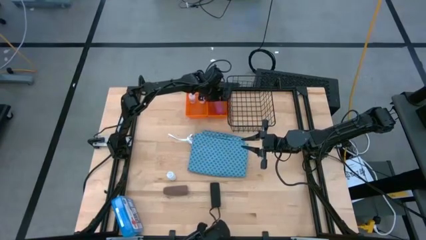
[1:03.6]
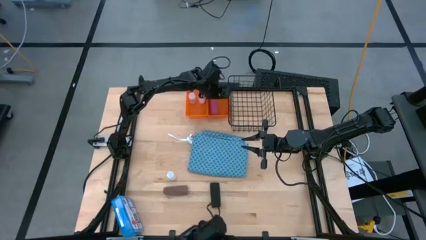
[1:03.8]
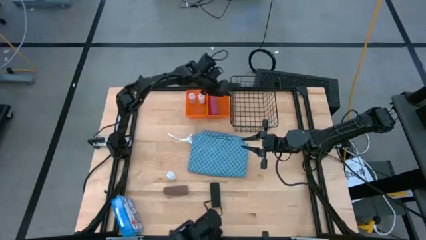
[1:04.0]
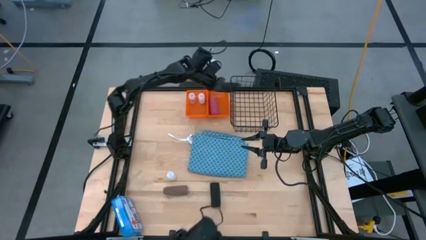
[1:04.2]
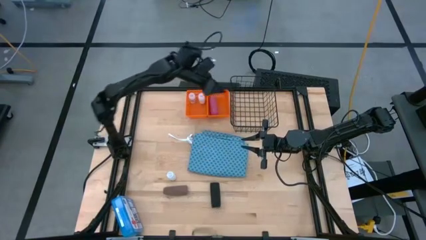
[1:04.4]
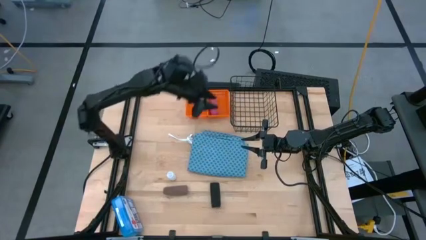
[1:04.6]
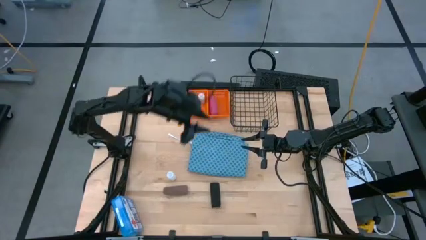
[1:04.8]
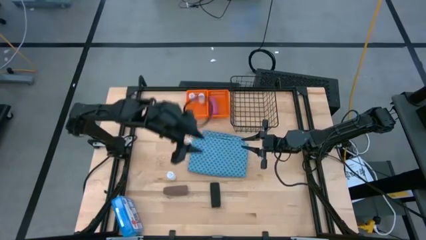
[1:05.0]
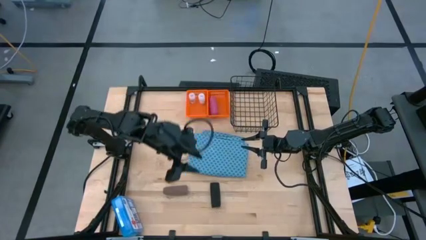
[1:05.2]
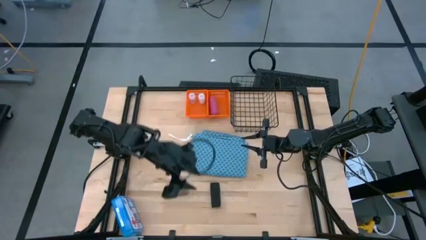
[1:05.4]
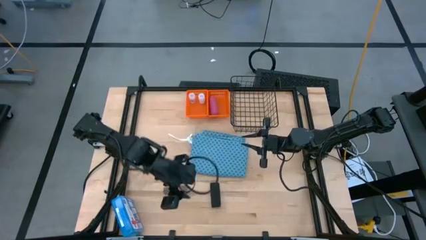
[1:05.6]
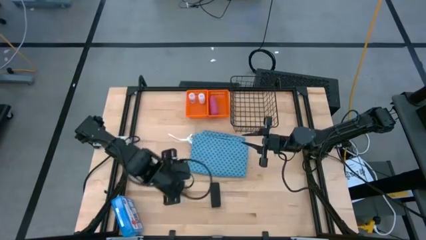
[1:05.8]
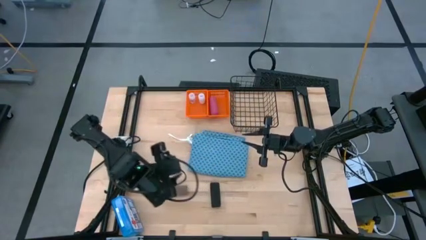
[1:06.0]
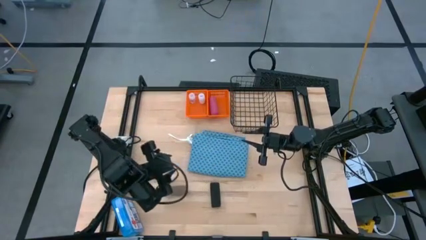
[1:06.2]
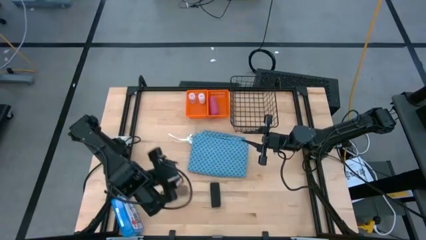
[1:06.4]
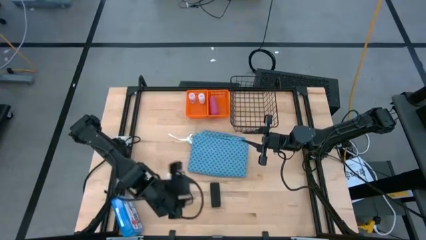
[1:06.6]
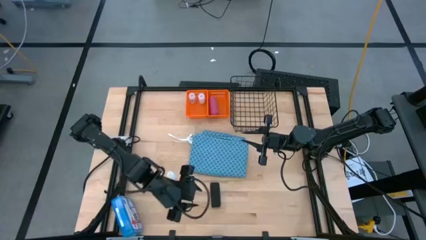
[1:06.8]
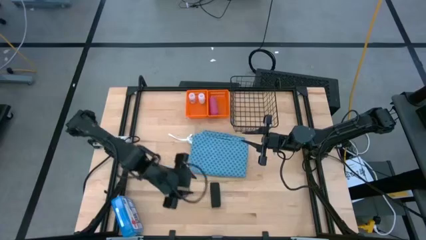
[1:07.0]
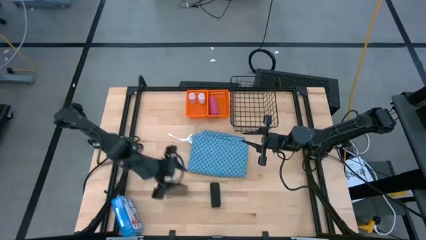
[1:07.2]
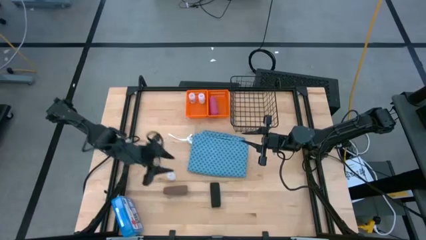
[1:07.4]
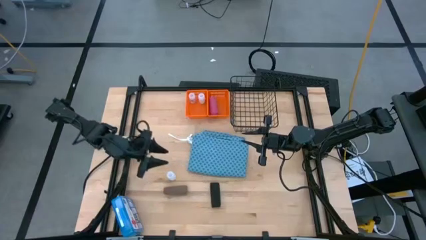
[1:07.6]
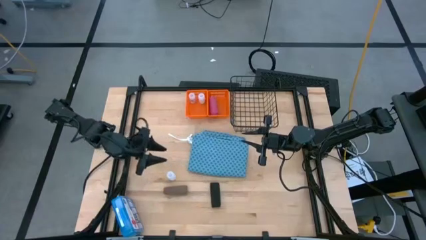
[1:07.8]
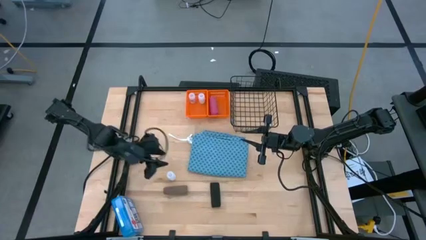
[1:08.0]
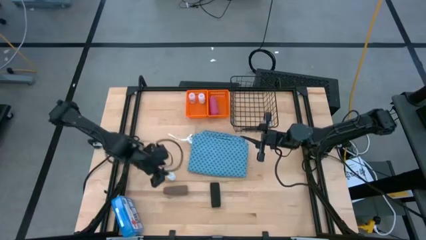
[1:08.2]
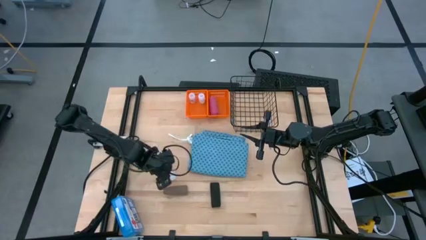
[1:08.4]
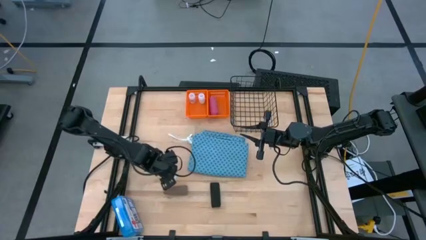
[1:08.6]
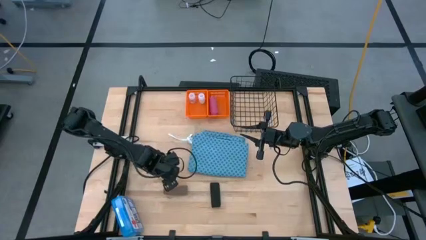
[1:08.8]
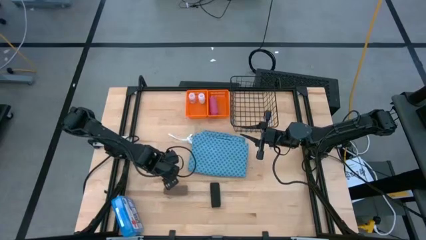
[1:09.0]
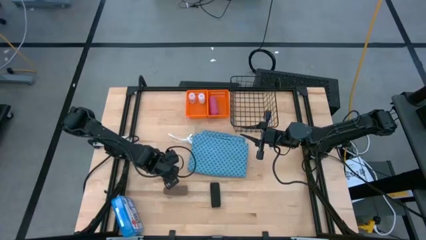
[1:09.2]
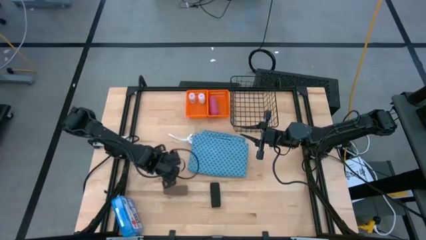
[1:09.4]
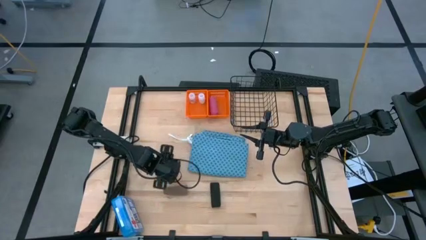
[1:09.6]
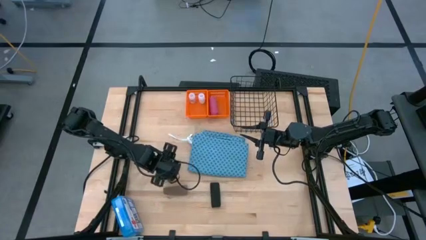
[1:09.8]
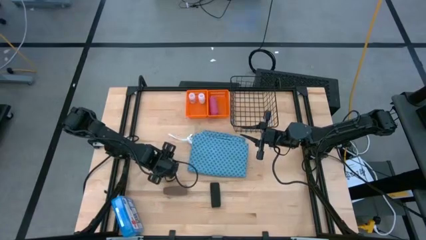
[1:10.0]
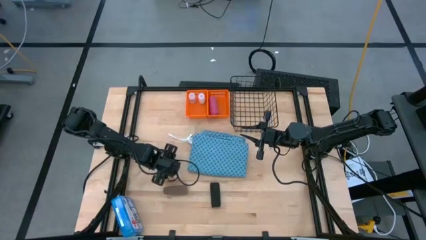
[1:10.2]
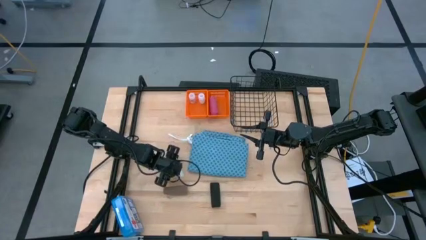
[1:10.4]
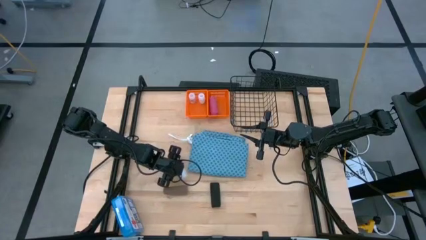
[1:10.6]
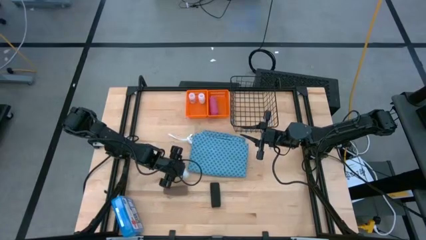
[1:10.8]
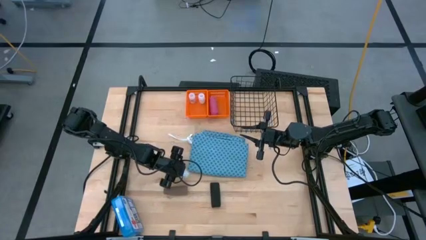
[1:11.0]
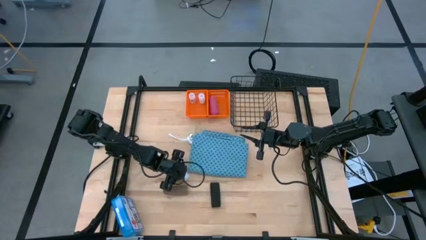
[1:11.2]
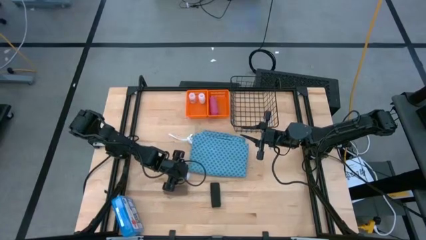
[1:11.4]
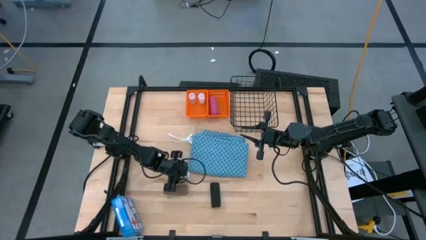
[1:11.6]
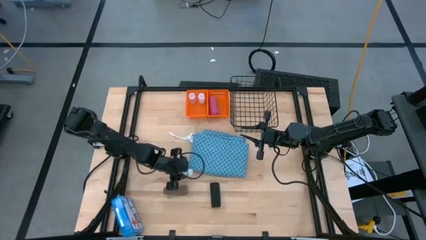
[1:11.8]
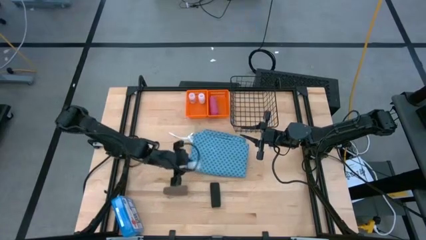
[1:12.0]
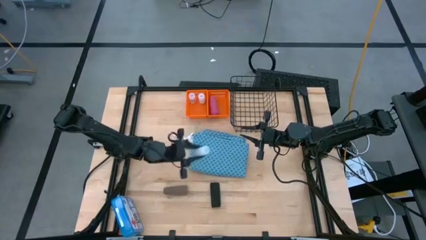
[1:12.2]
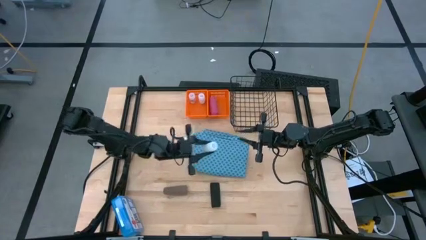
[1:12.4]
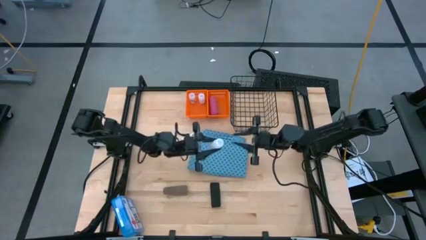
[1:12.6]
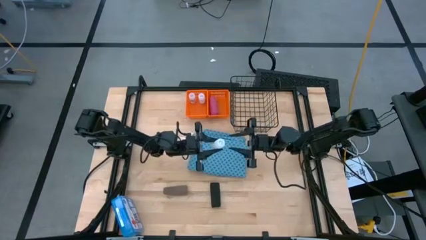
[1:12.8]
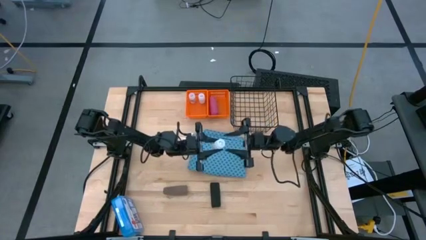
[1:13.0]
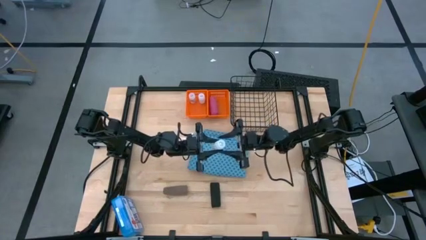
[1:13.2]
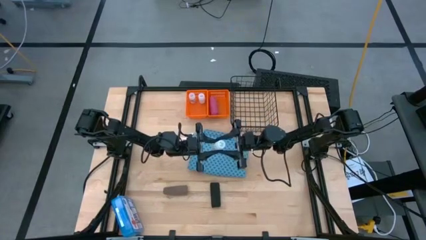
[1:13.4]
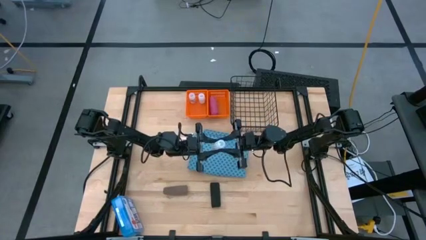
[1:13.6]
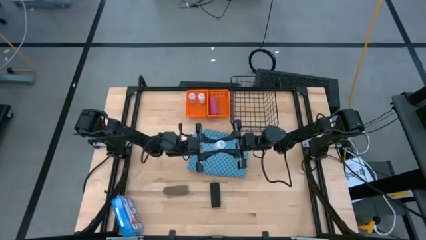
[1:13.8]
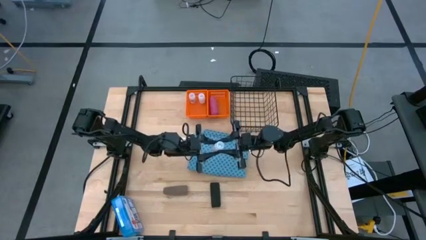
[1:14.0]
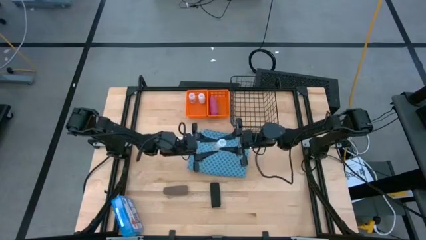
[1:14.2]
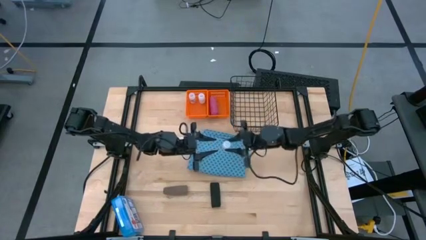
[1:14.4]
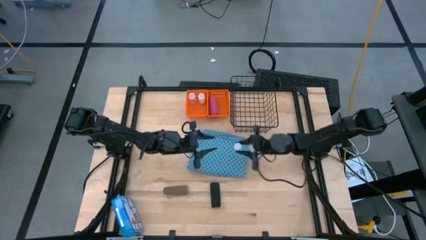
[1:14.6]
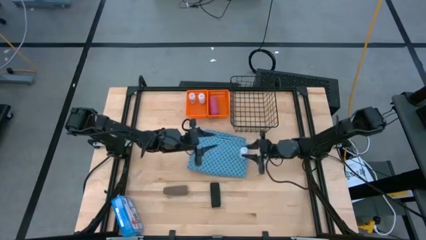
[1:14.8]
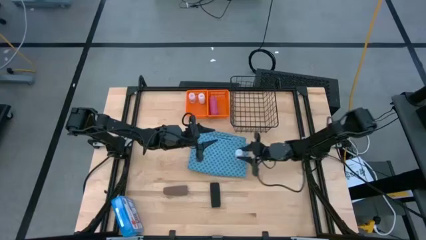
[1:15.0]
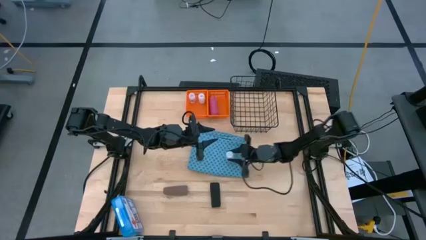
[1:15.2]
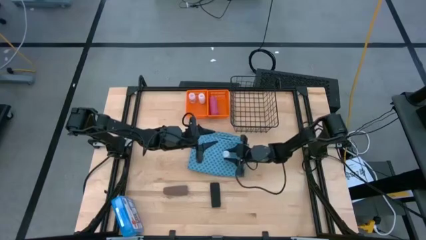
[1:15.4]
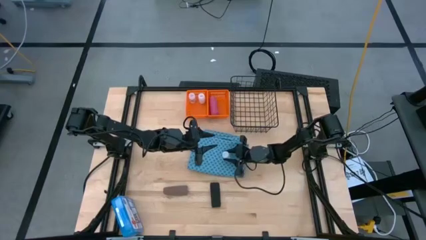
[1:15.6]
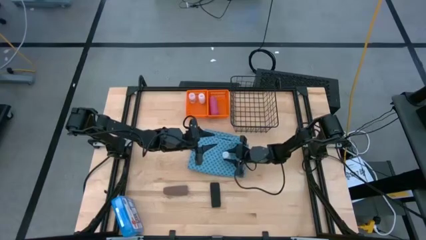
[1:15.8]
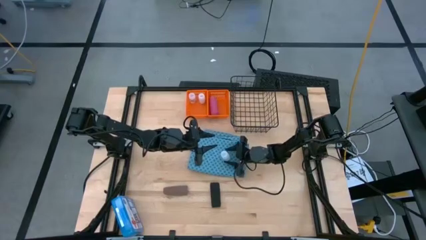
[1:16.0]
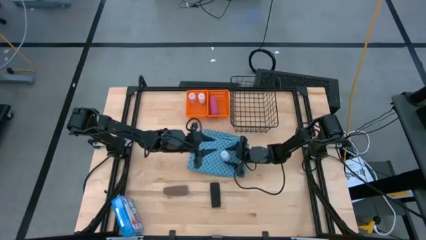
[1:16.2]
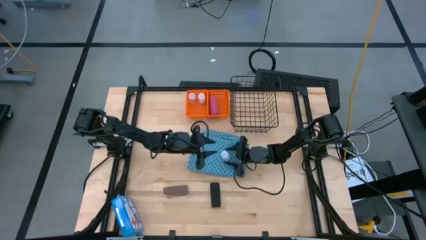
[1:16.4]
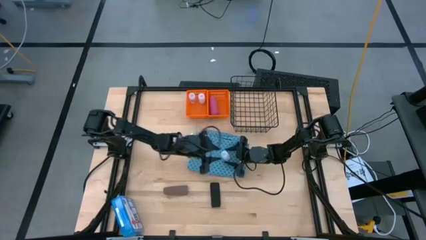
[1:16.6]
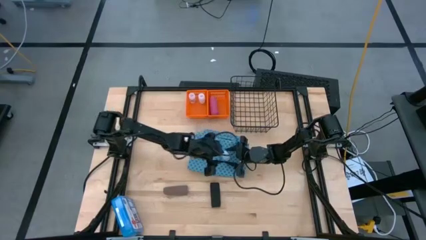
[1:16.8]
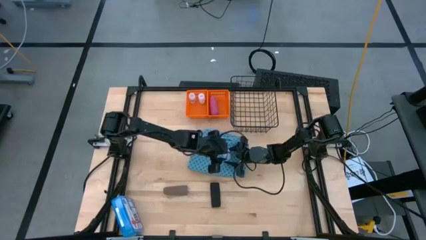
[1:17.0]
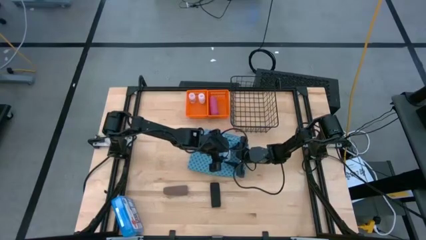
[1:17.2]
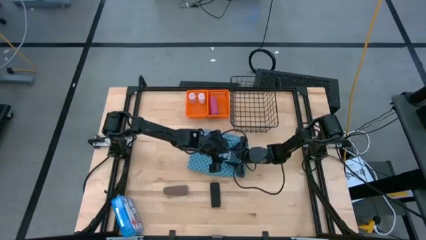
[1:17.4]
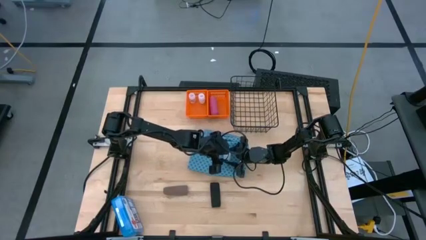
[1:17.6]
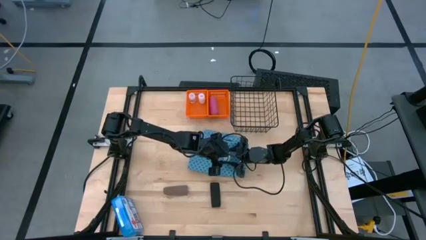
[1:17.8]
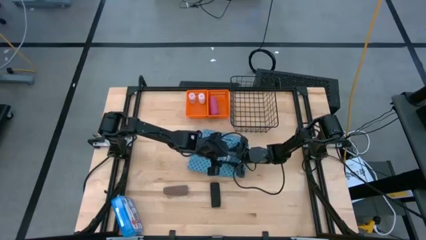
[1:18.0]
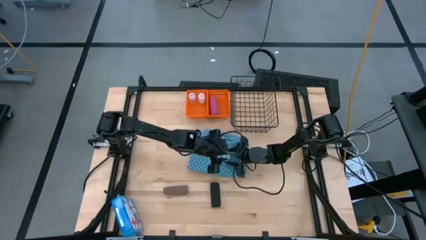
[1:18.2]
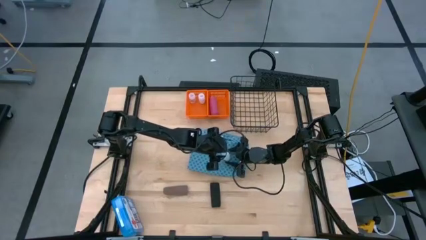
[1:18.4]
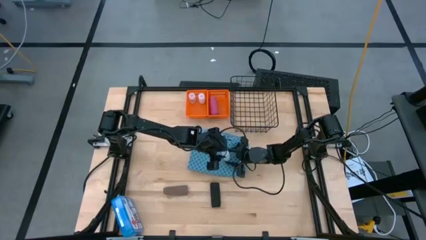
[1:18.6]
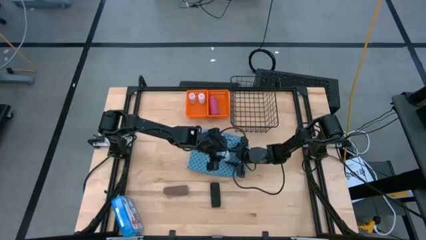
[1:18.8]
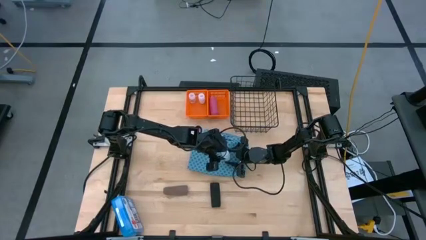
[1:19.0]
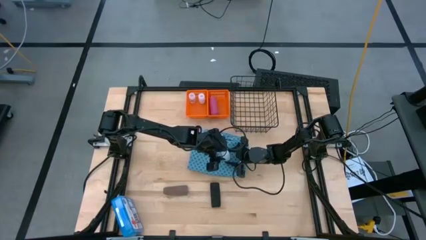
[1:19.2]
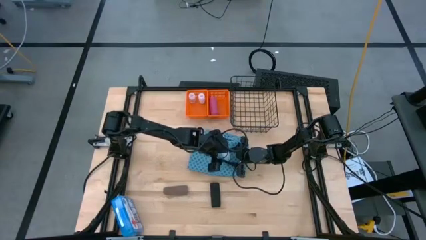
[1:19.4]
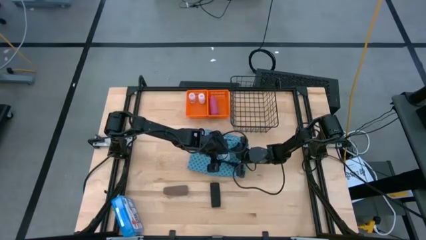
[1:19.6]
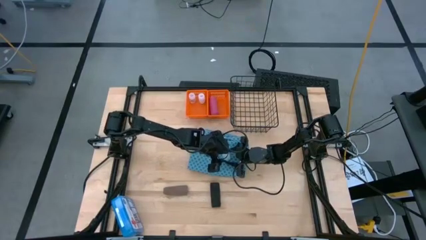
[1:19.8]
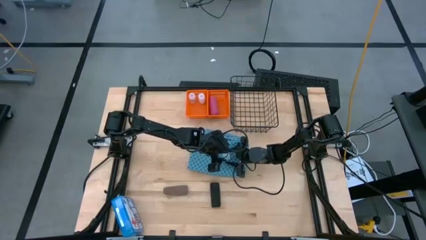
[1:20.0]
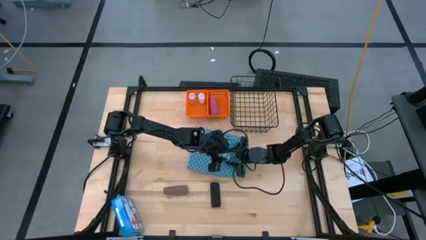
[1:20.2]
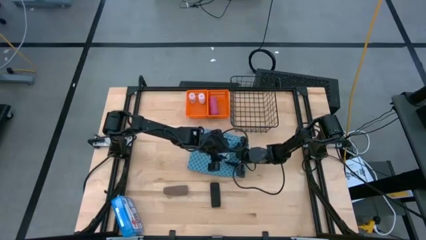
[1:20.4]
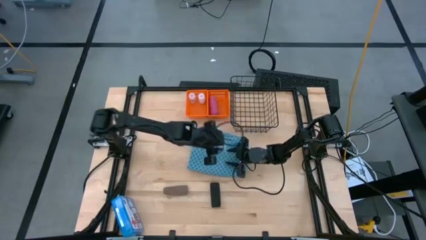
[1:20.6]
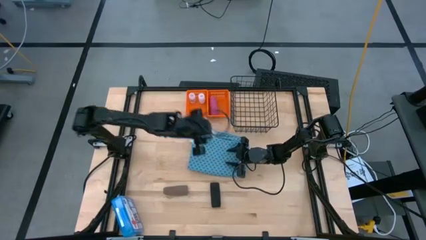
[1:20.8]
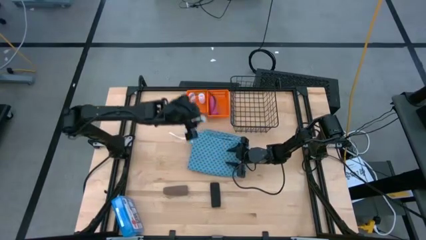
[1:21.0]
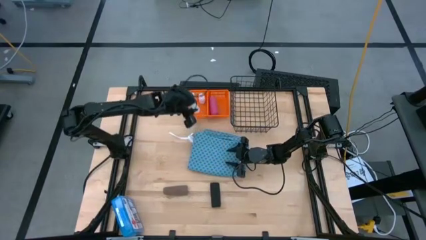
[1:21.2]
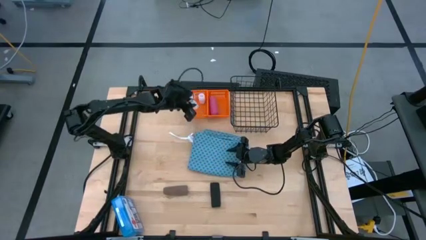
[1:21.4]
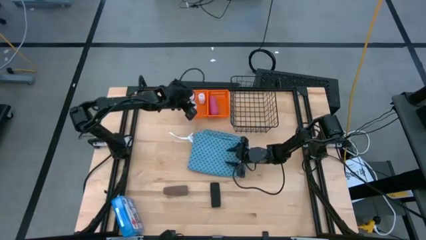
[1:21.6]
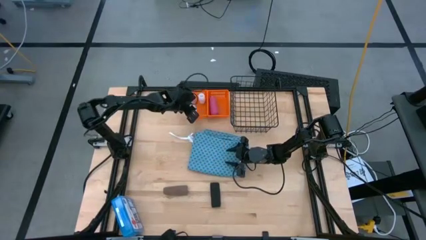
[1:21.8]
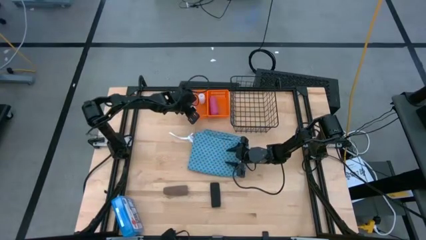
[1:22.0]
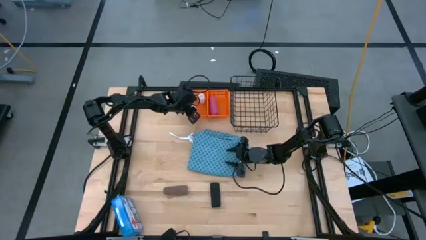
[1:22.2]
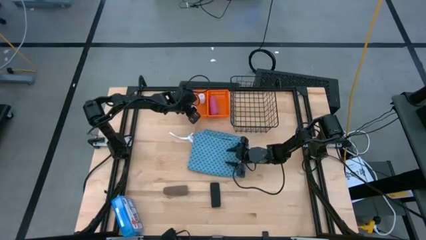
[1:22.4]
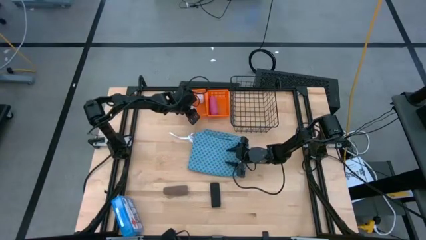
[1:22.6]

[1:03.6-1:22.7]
Task: Pick & Place Medicine items
Put the transparent pill bottle into the left orange basket
